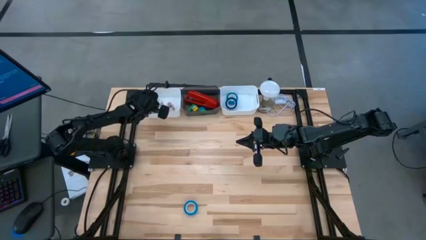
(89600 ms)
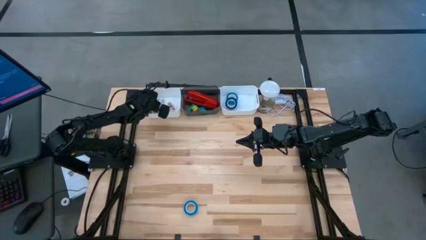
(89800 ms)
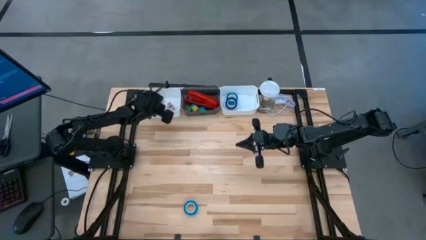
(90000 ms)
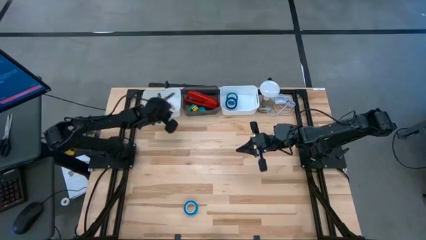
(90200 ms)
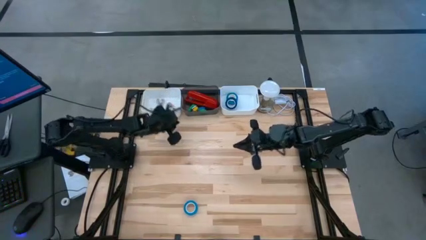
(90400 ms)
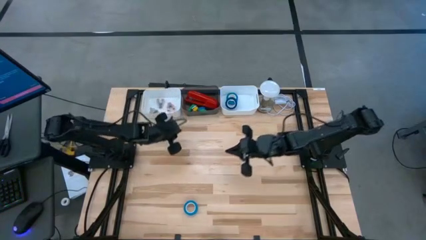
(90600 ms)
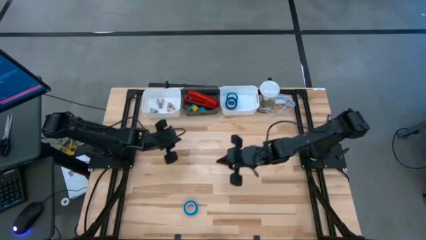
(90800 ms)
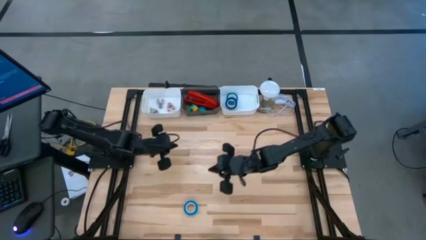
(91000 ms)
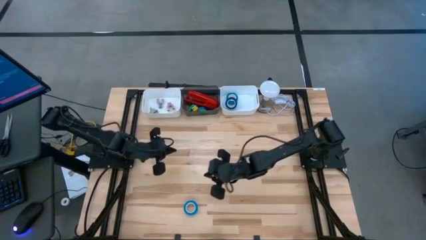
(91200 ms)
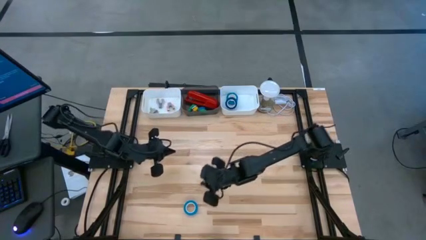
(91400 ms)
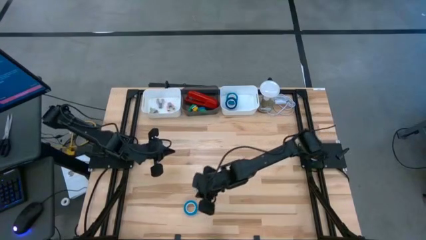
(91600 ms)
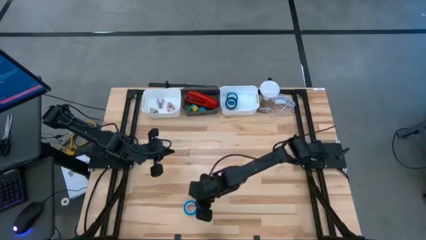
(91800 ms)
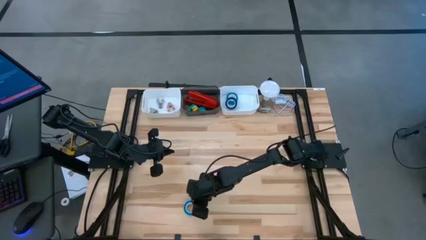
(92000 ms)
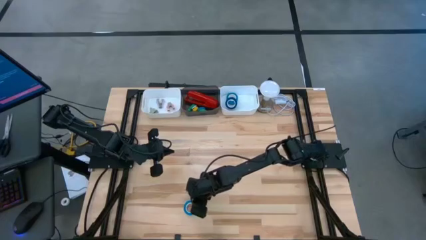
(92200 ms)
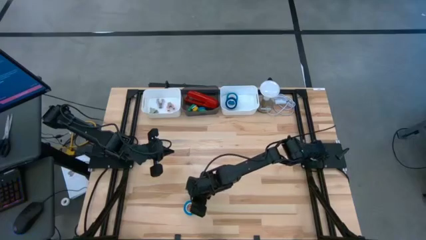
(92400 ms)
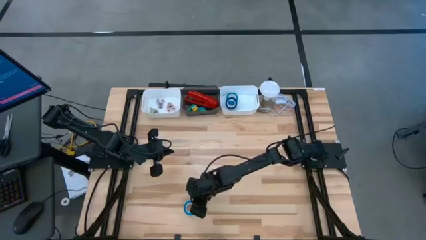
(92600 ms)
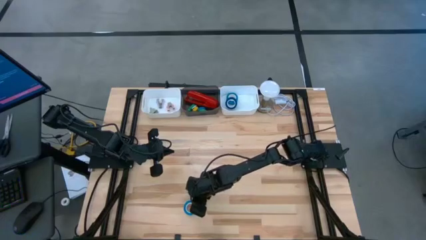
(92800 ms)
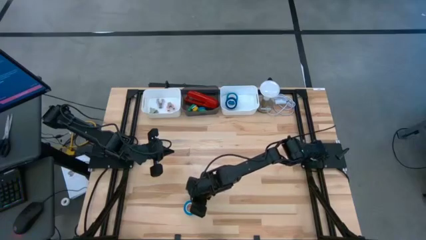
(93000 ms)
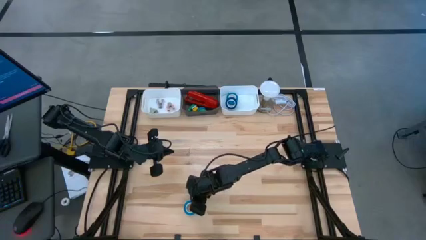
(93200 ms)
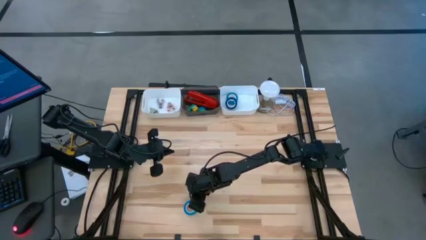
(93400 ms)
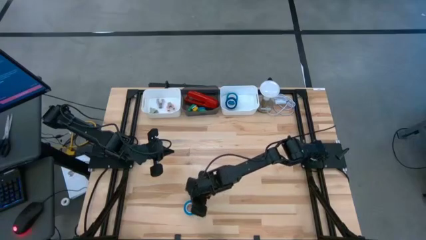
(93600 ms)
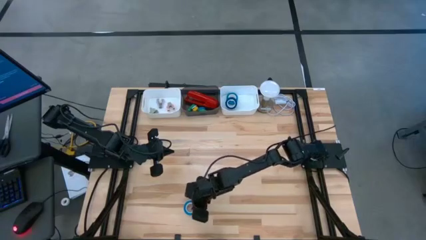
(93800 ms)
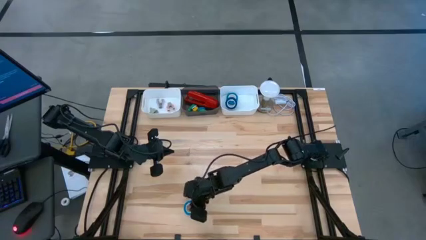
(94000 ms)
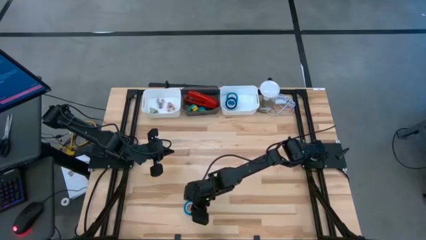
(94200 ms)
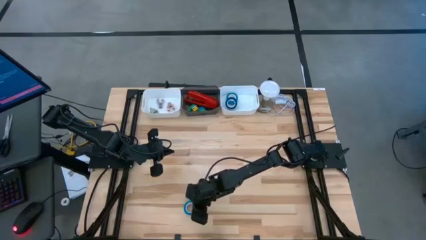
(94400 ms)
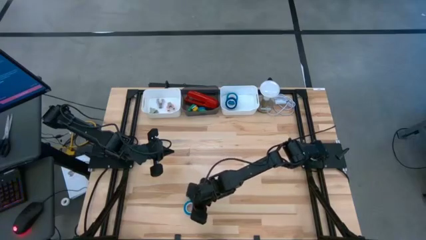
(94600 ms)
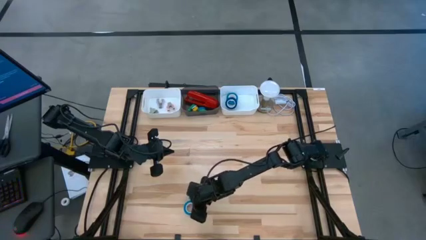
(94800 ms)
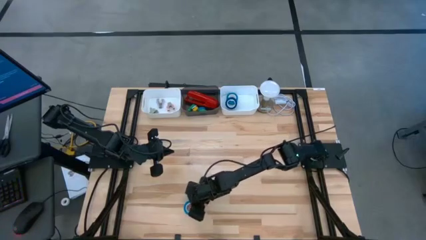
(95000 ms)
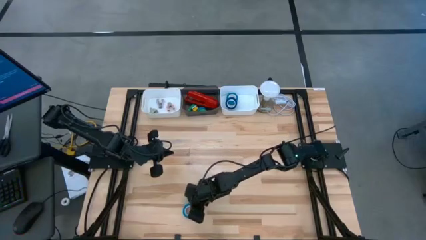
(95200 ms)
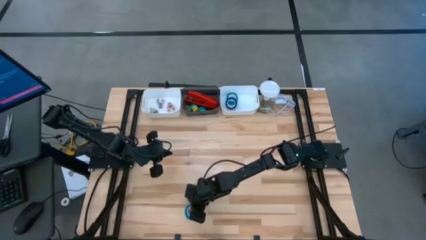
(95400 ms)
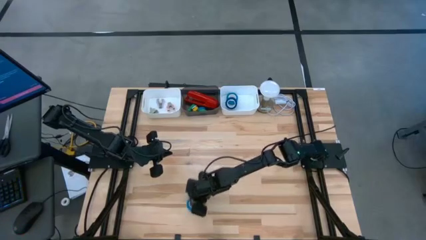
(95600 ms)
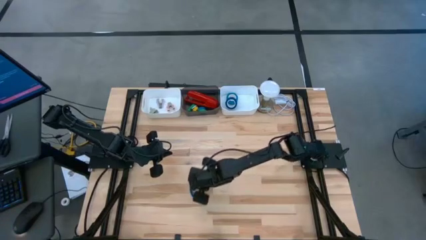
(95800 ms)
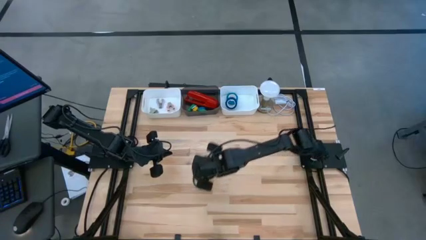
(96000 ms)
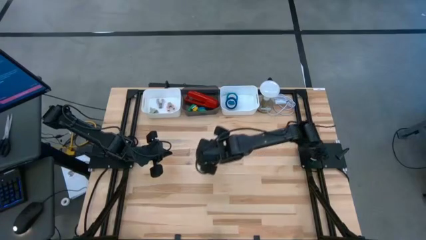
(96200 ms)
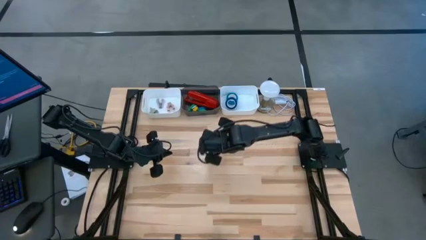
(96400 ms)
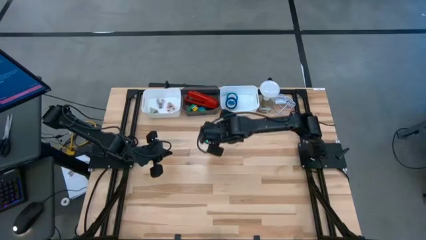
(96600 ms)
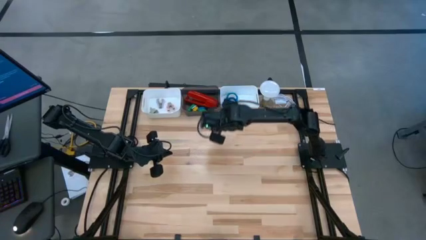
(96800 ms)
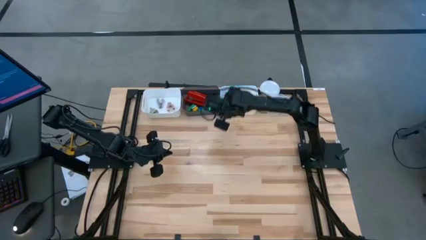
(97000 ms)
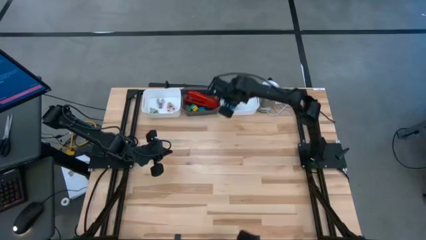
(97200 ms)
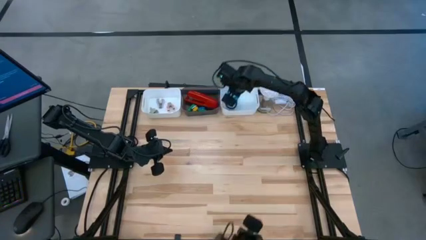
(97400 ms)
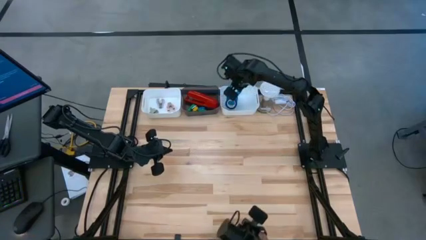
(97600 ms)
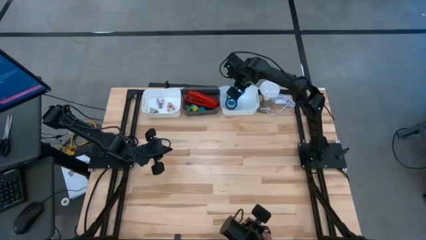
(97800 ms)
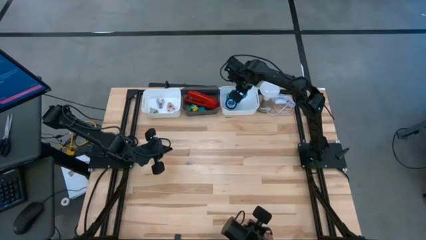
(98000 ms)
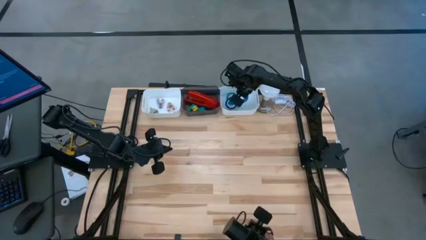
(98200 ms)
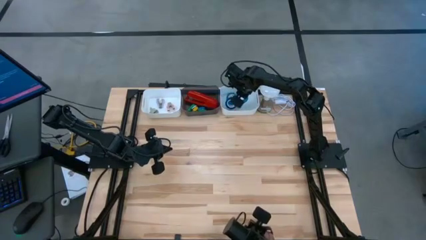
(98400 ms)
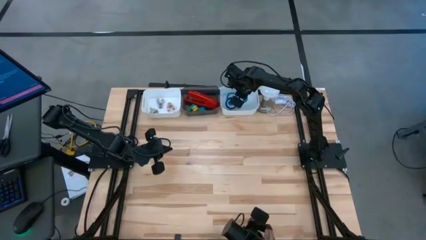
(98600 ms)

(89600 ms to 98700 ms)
Task: Pick and place Stapler, Stapler remover, tape
Put the light blue tape into the right white bin

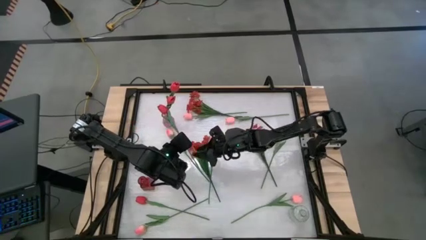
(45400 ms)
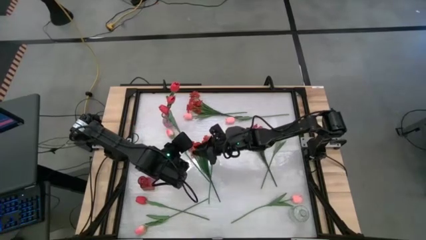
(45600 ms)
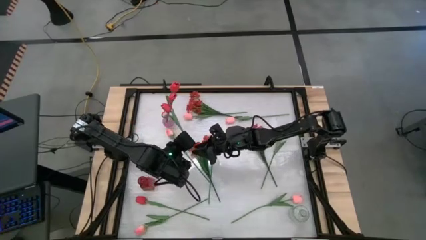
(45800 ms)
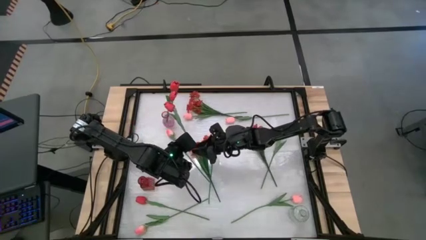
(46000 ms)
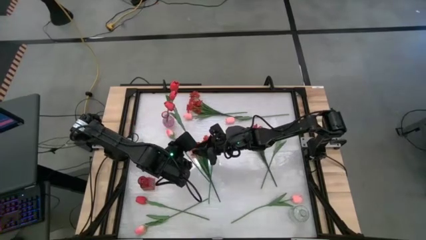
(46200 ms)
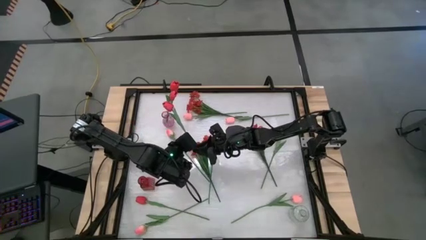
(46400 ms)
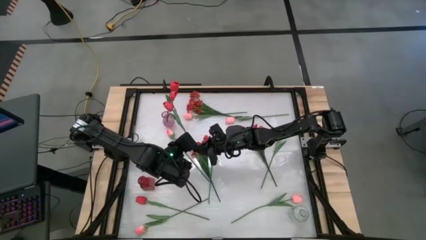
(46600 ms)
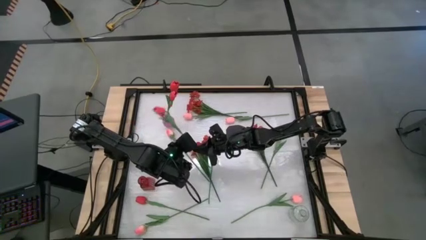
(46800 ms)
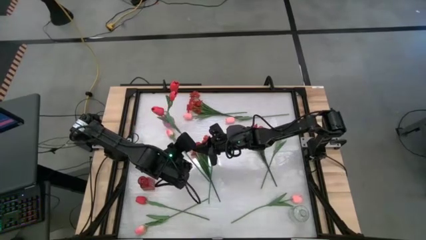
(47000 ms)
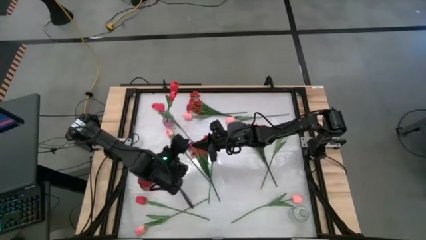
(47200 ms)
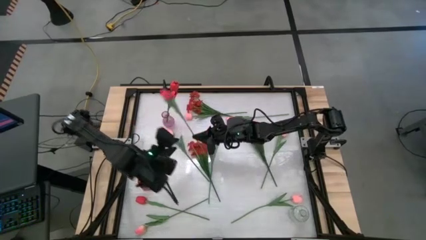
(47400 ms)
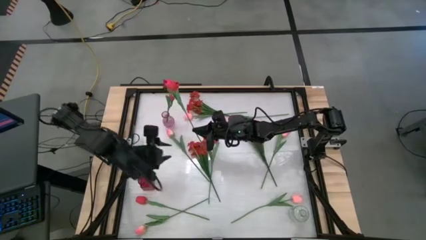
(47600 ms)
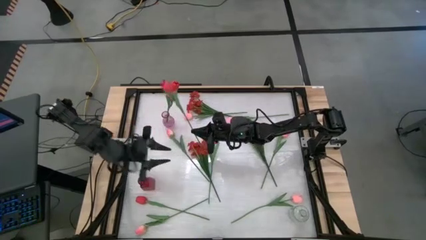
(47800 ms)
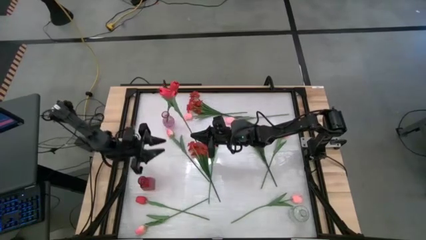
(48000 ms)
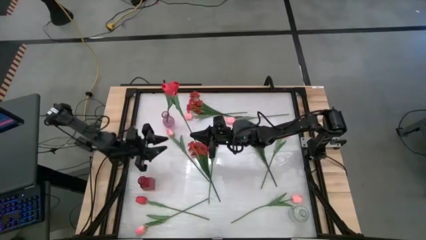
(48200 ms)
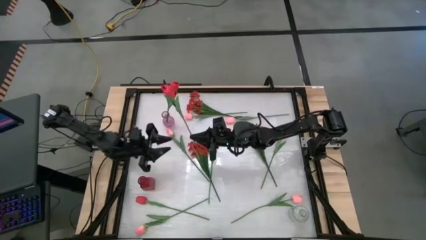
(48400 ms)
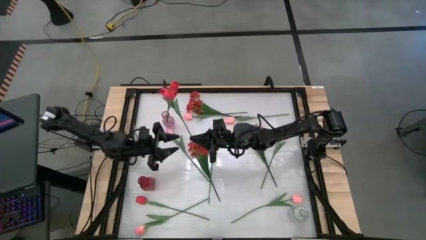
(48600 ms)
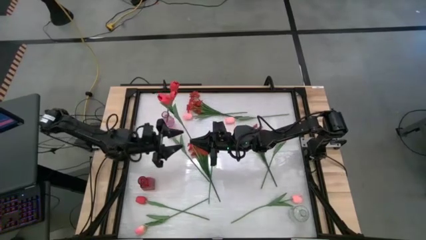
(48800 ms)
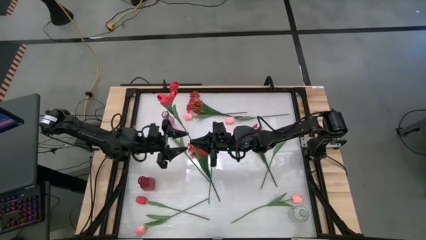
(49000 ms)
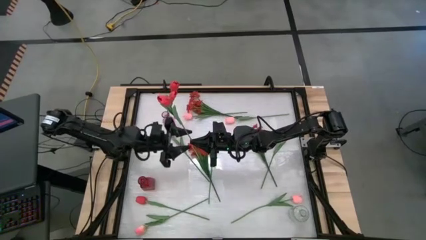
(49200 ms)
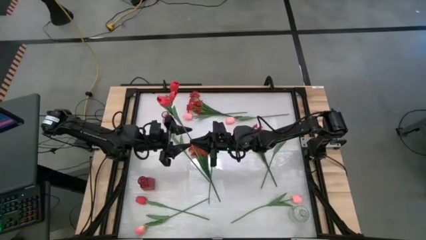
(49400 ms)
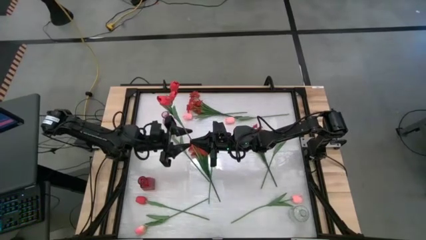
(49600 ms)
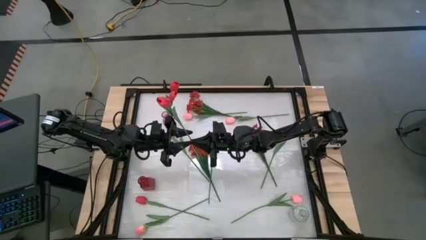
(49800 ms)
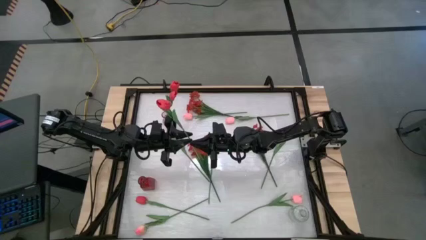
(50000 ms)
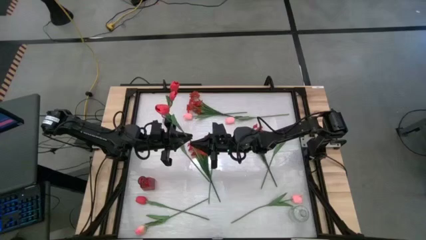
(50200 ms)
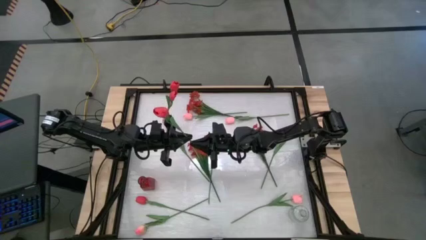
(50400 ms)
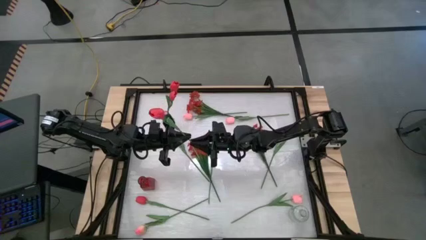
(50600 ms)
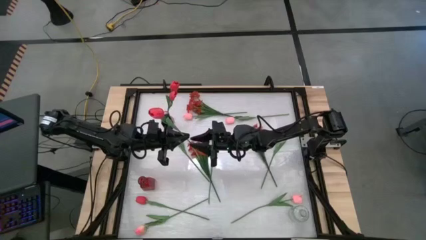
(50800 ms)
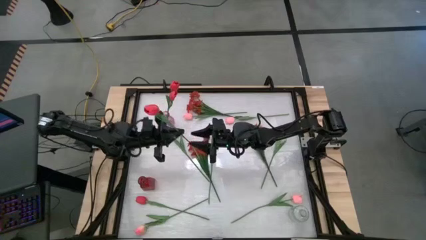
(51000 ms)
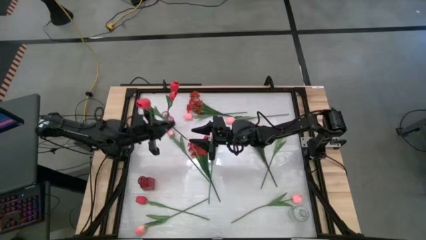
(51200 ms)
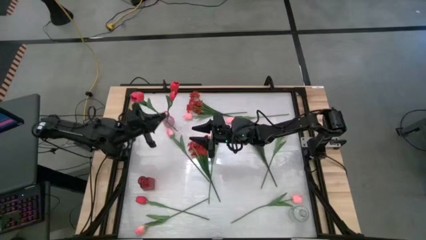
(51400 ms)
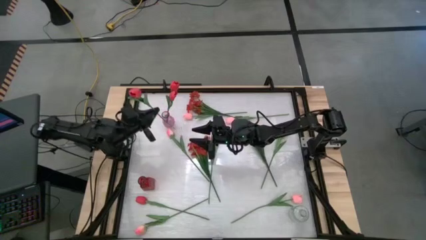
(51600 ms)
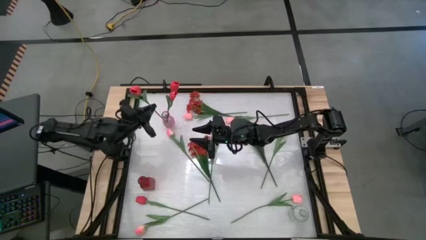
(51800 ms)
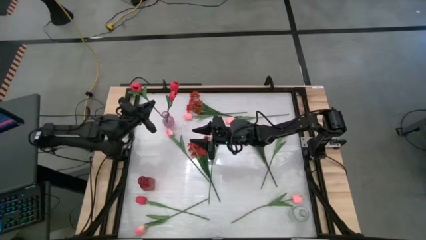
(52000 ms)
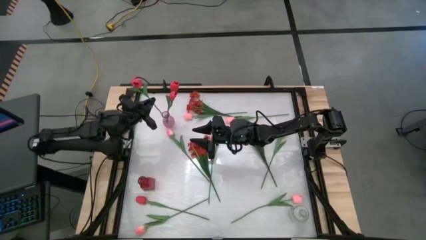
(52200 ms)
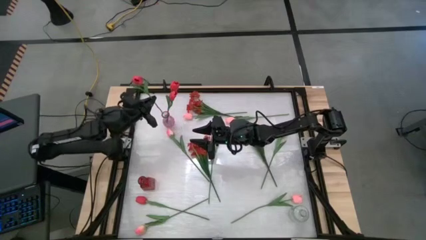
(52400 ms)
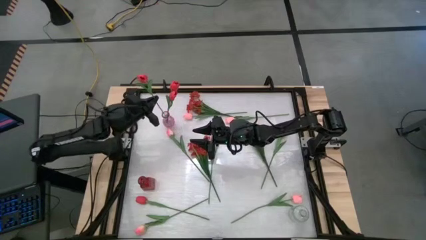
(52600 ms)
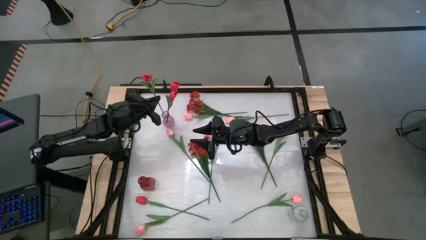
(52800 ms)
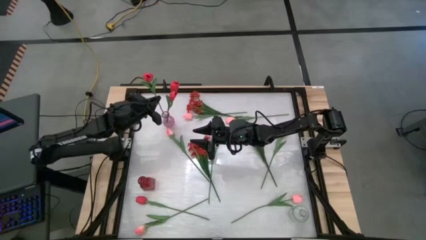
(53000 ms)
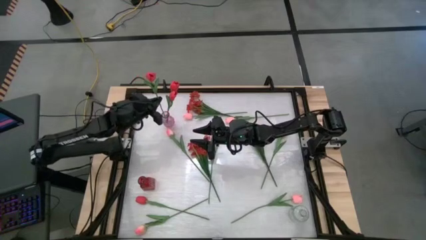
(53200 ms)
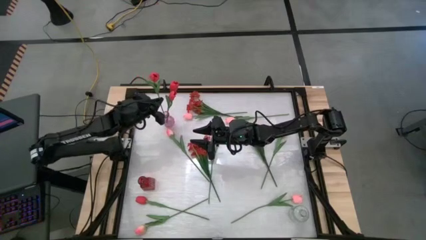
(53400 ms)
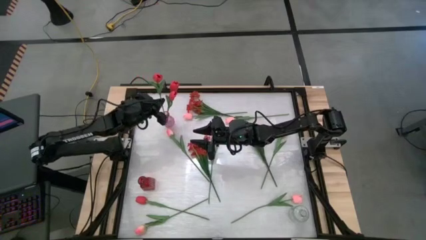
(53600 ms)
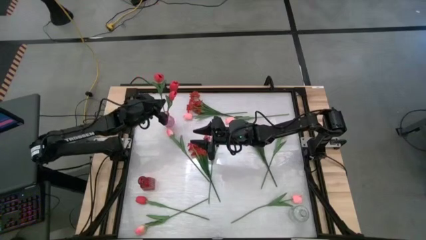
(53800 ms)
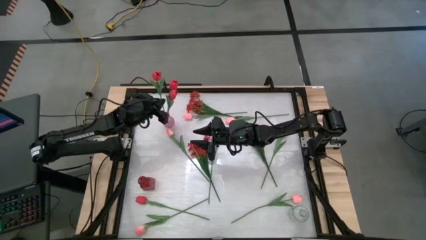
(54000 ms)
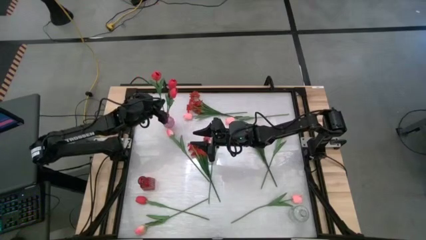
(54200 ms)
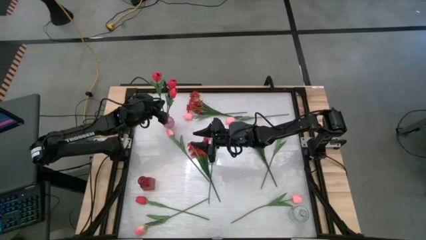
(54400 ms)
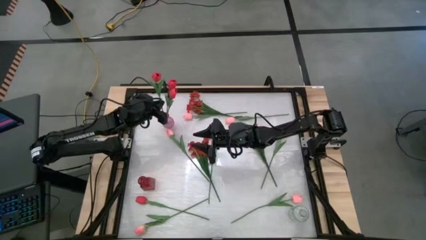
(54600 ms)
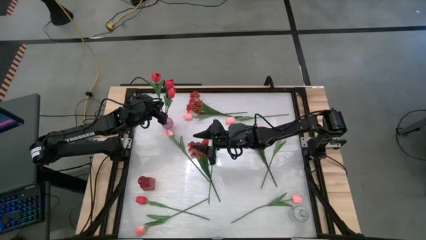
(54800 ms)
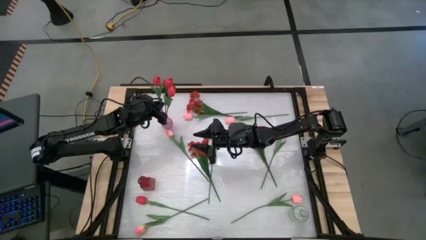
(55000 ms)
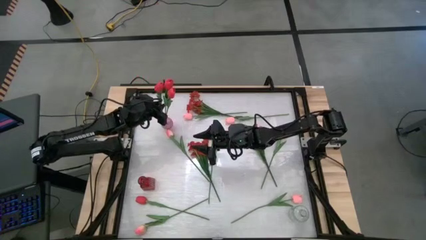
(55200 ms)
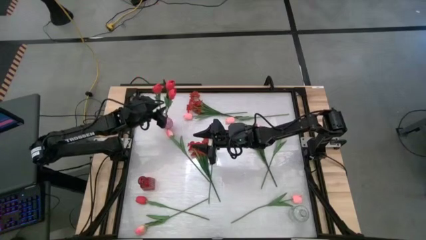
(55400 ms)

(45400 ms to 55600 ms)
Task: Sort flowers into vase by color
Put the red tulip into the purple vase
